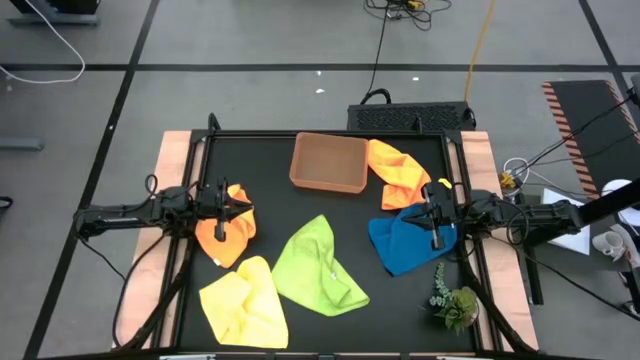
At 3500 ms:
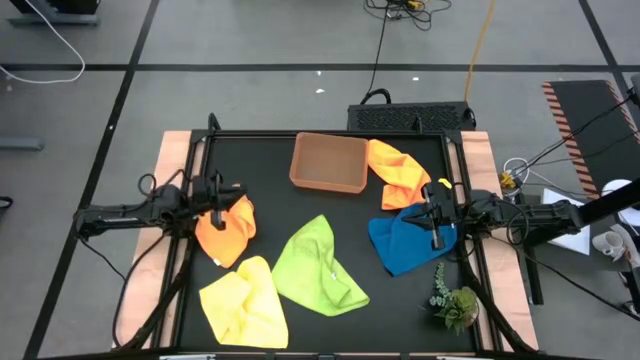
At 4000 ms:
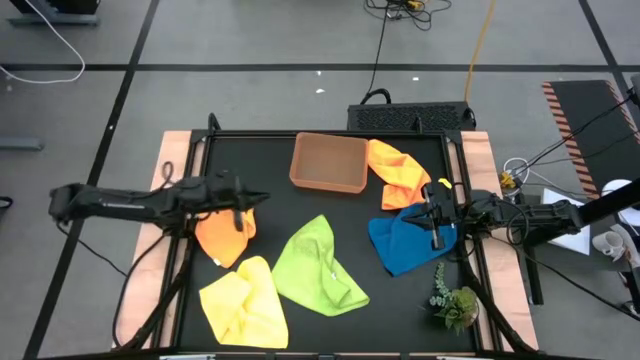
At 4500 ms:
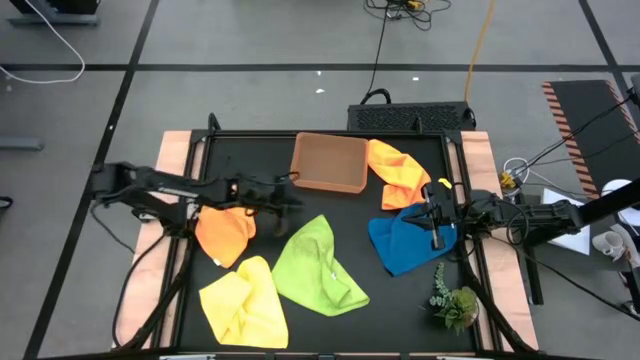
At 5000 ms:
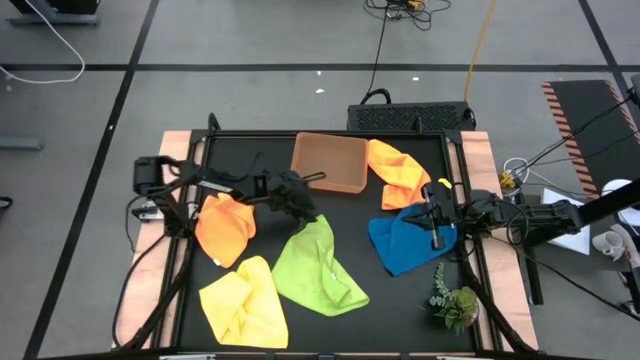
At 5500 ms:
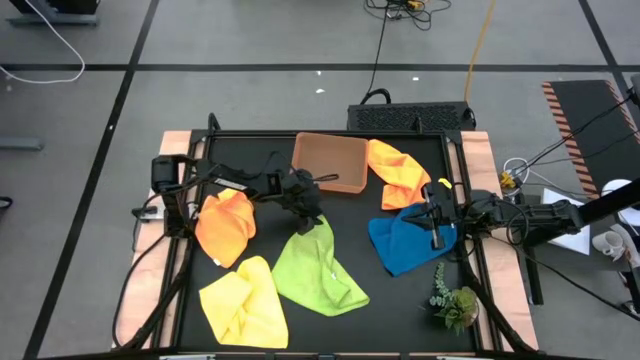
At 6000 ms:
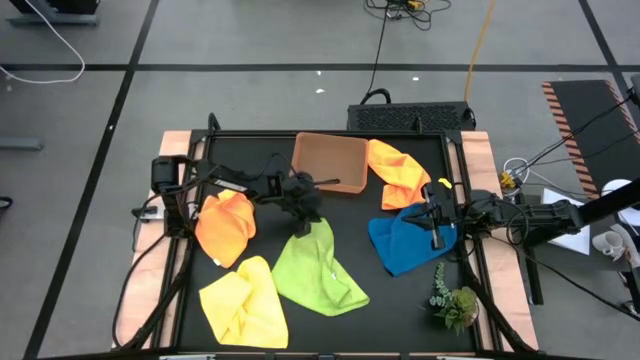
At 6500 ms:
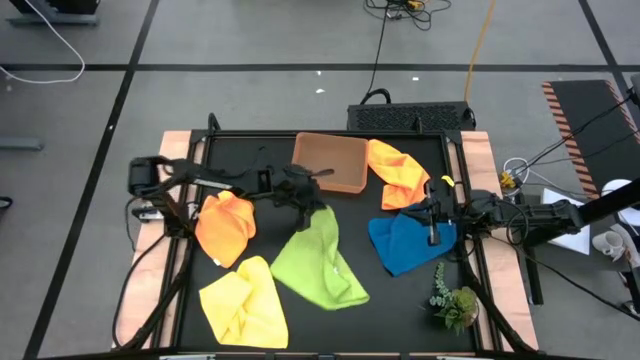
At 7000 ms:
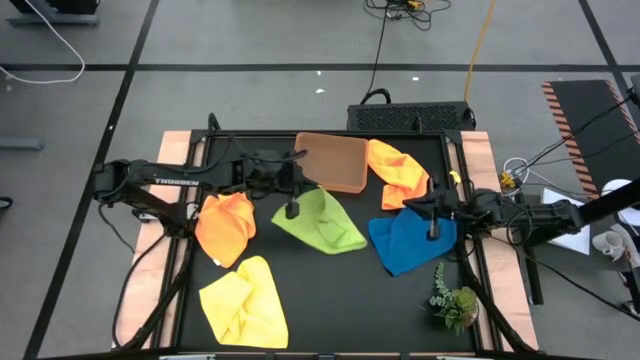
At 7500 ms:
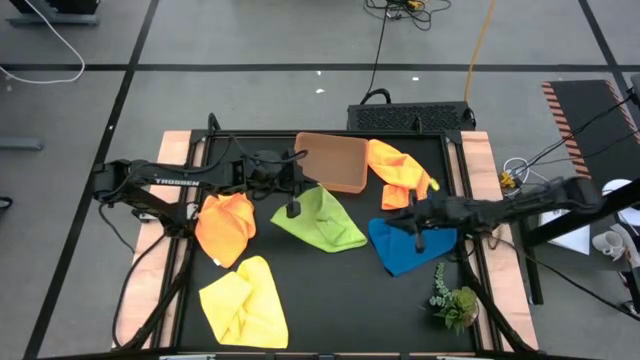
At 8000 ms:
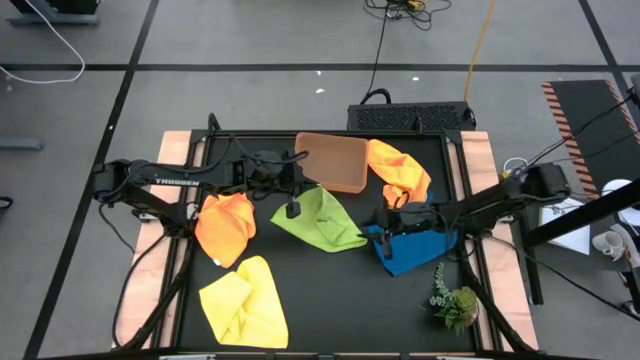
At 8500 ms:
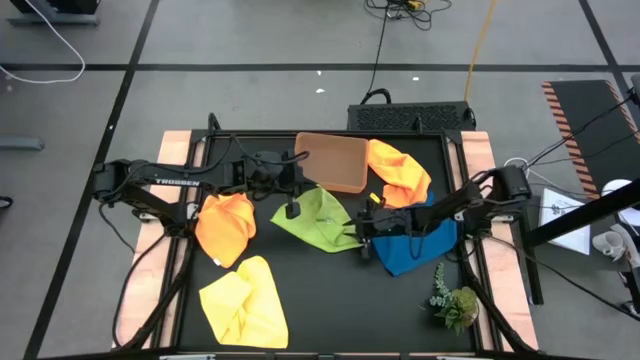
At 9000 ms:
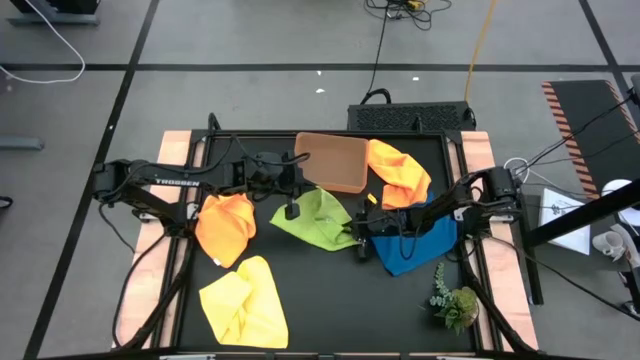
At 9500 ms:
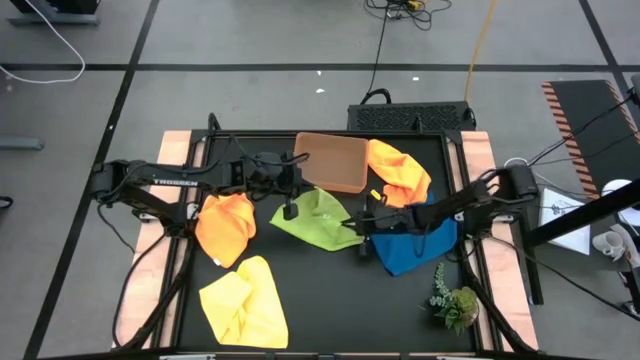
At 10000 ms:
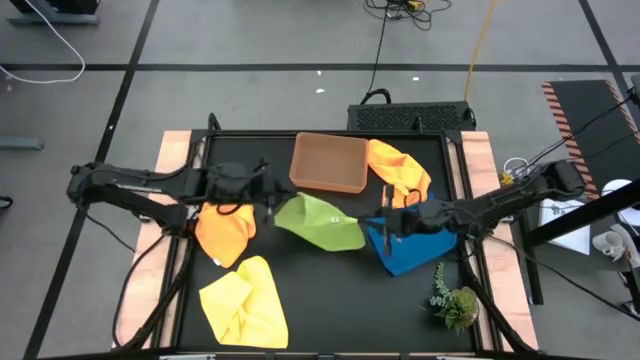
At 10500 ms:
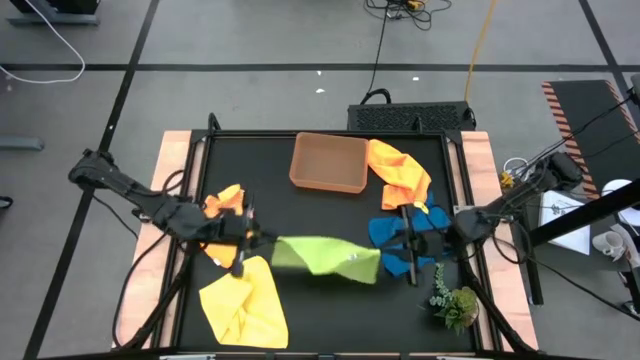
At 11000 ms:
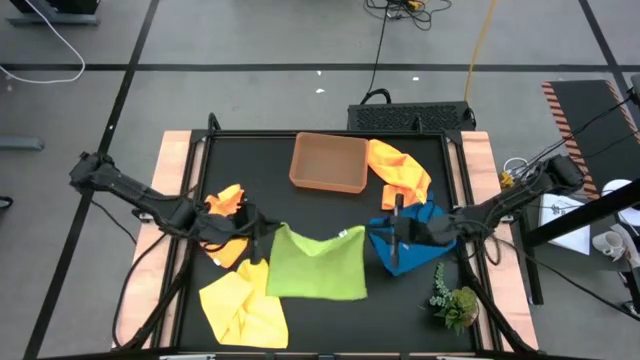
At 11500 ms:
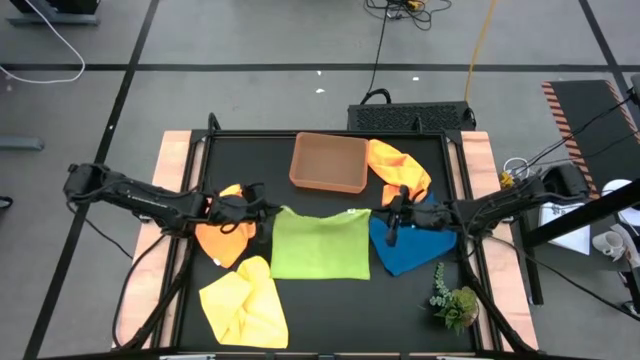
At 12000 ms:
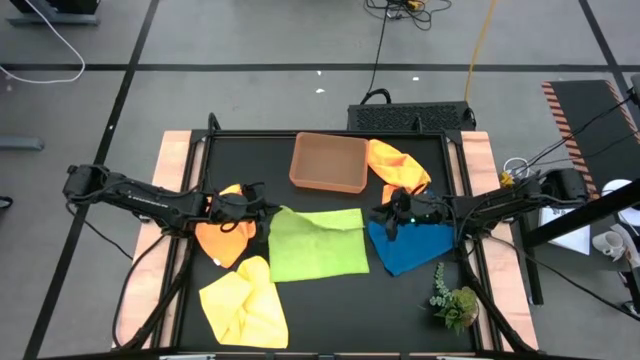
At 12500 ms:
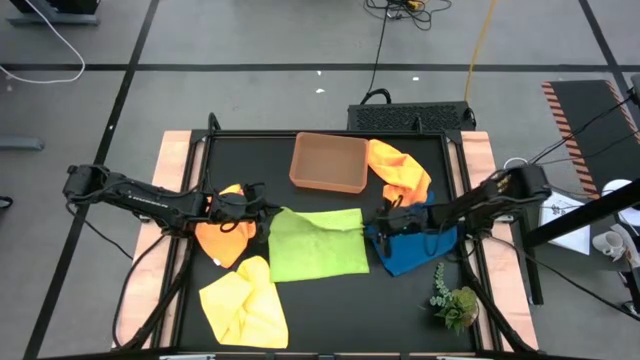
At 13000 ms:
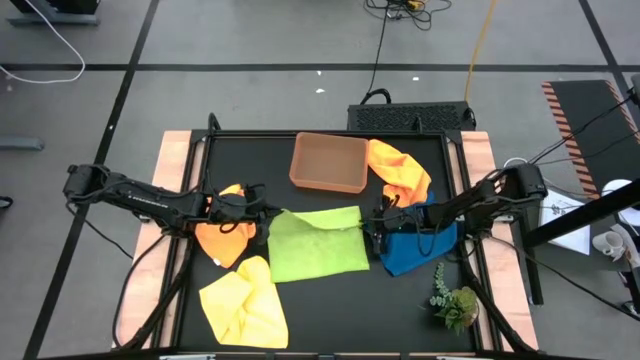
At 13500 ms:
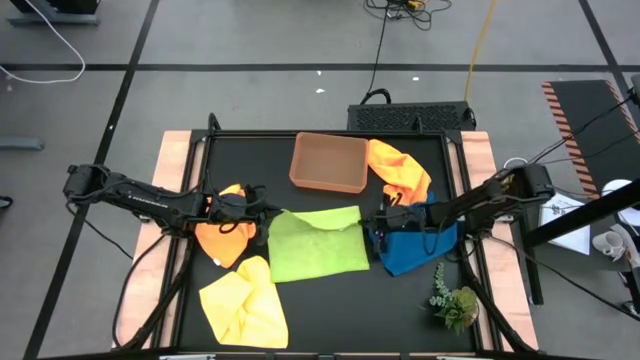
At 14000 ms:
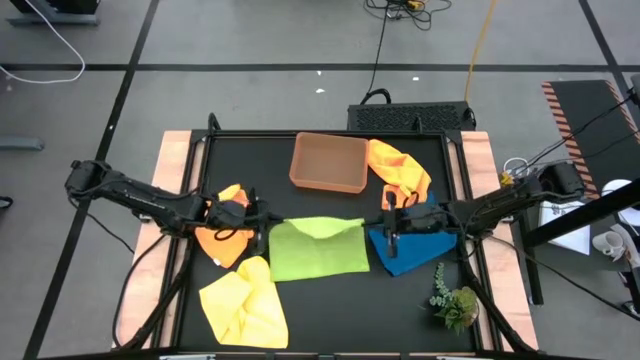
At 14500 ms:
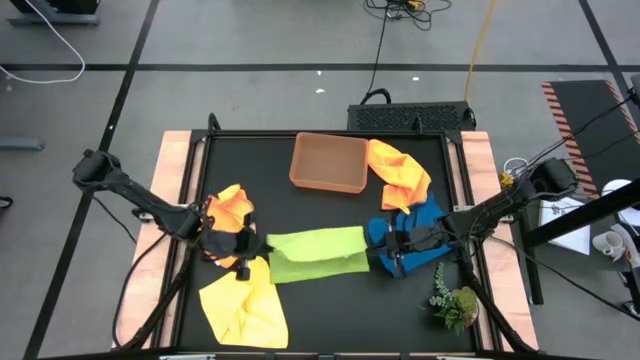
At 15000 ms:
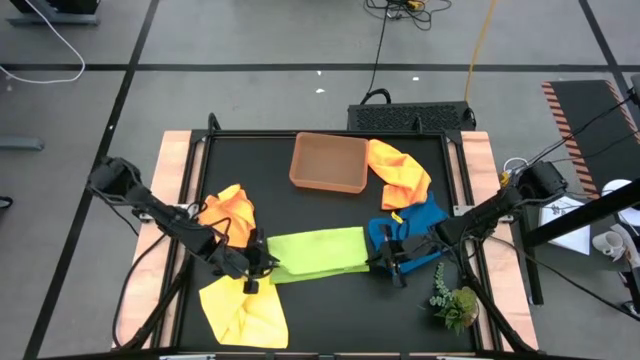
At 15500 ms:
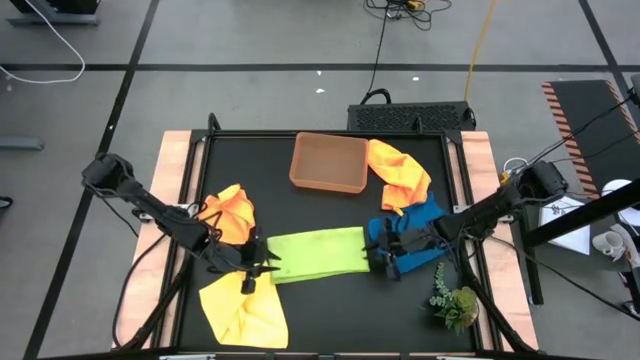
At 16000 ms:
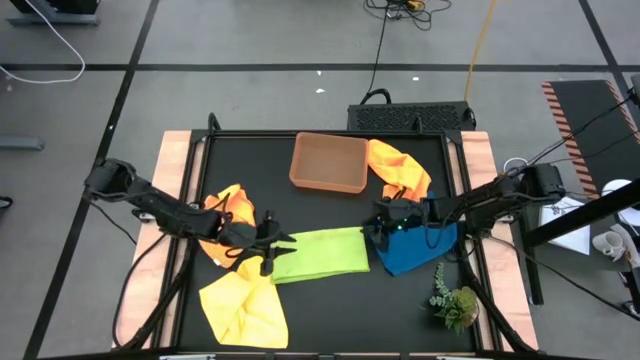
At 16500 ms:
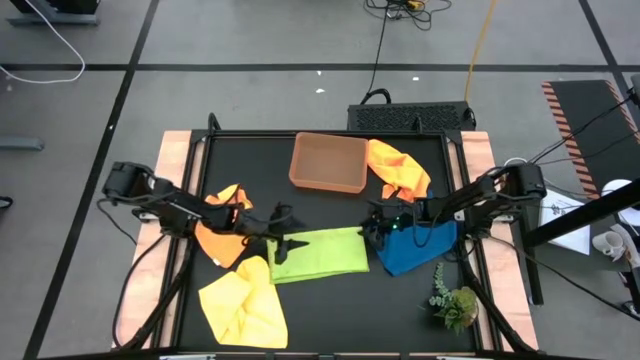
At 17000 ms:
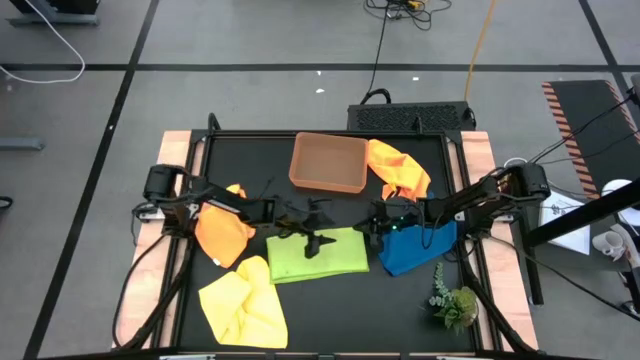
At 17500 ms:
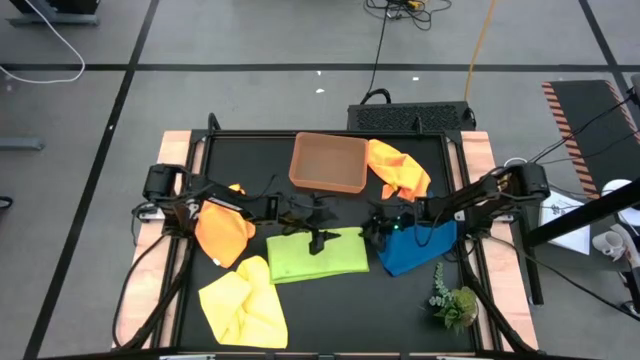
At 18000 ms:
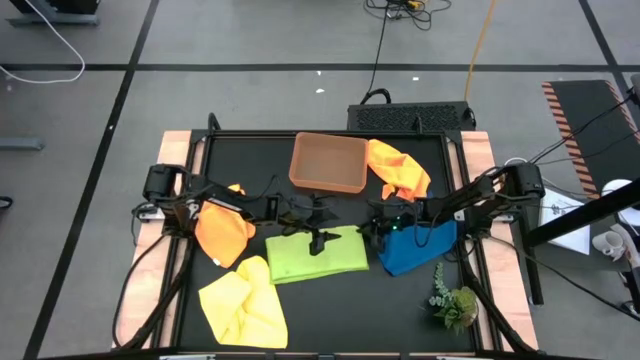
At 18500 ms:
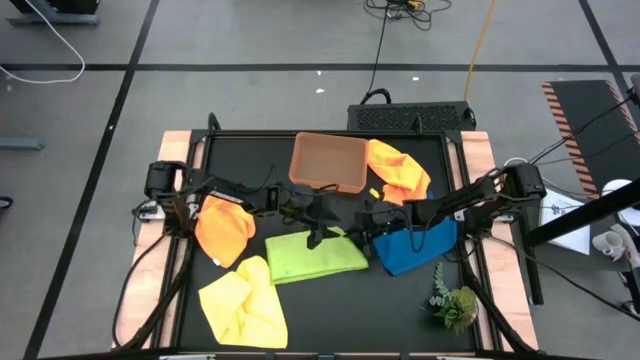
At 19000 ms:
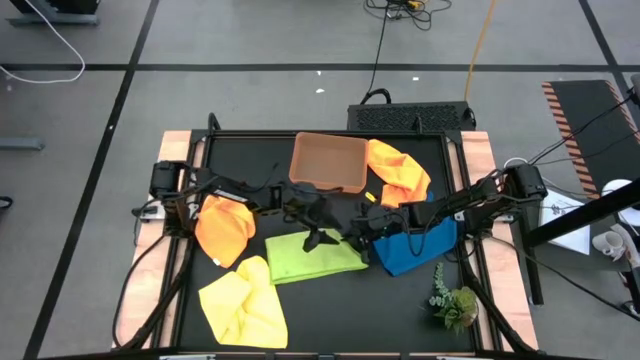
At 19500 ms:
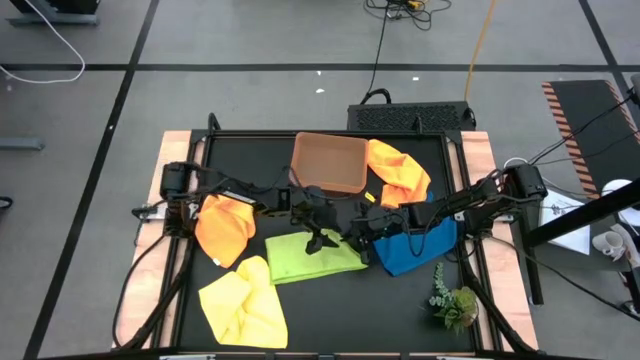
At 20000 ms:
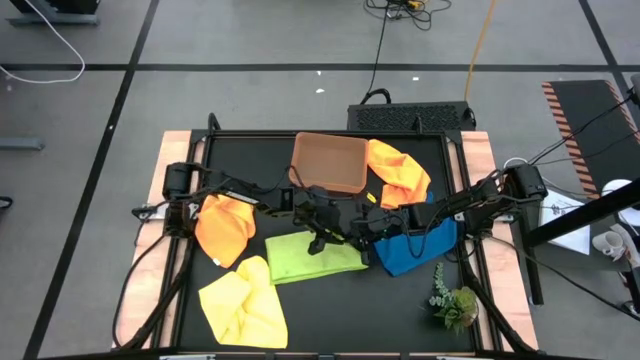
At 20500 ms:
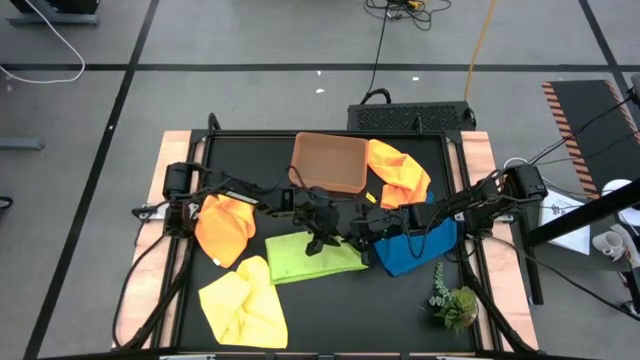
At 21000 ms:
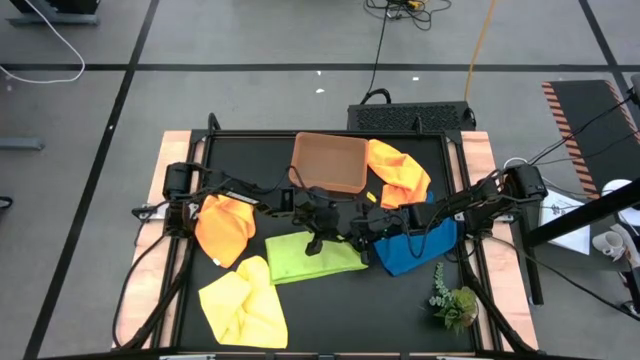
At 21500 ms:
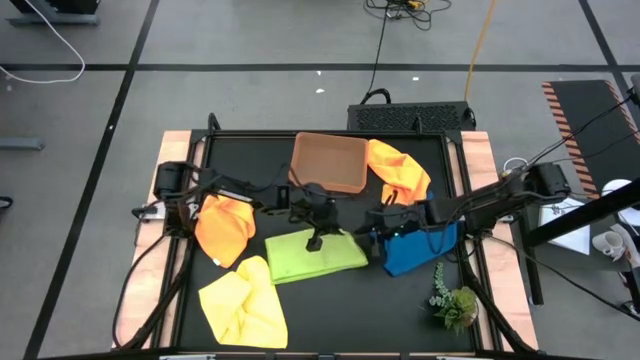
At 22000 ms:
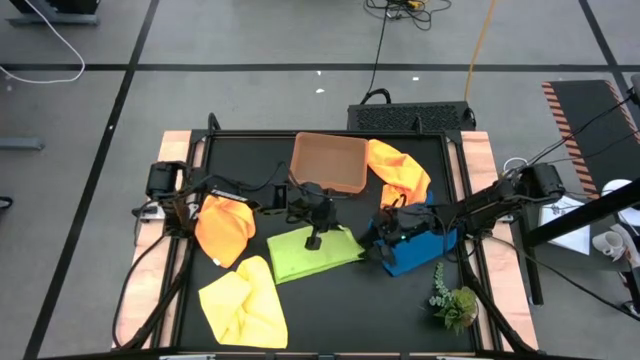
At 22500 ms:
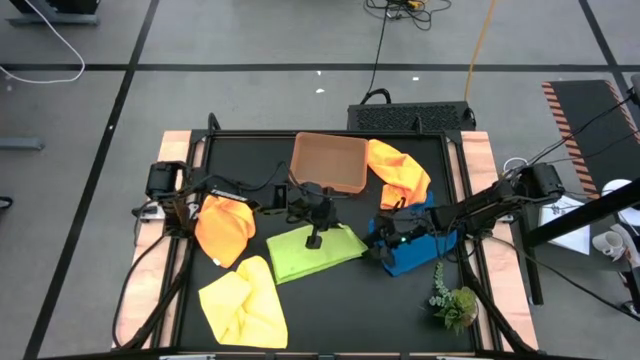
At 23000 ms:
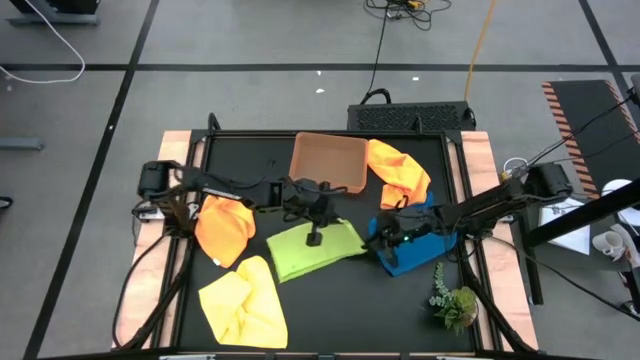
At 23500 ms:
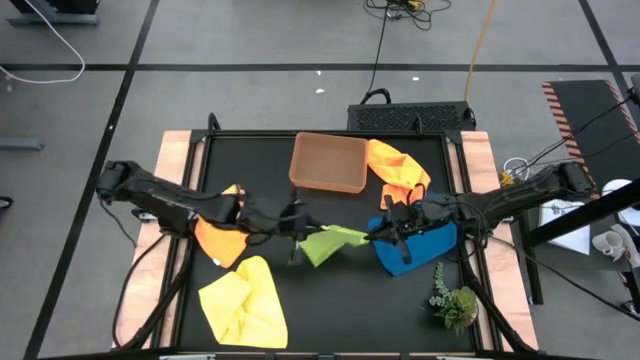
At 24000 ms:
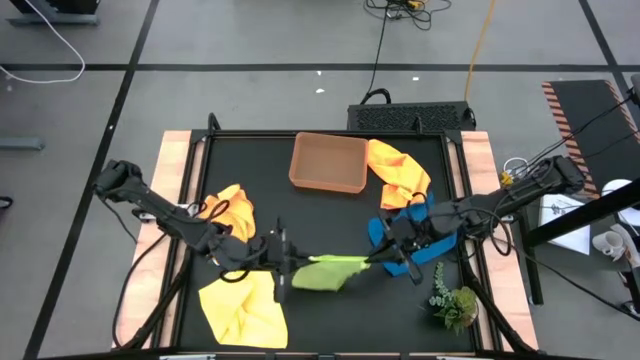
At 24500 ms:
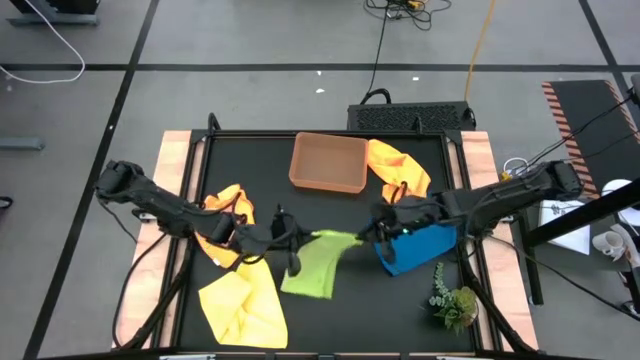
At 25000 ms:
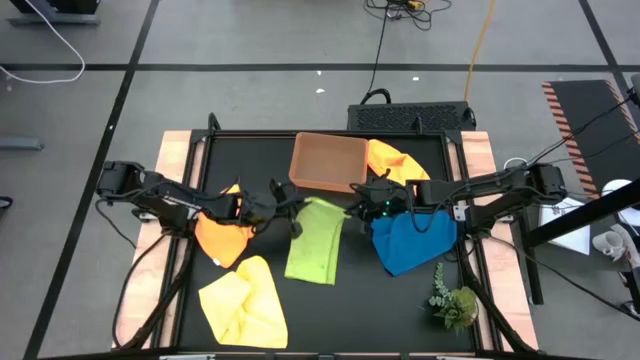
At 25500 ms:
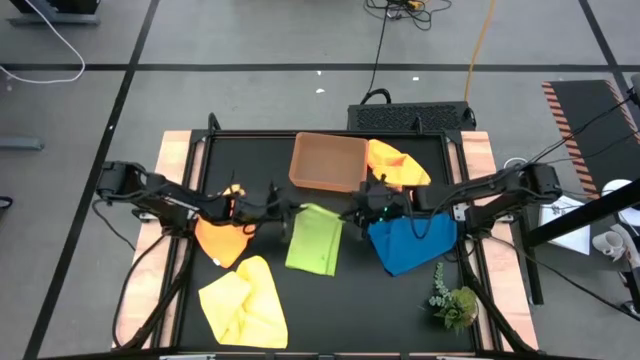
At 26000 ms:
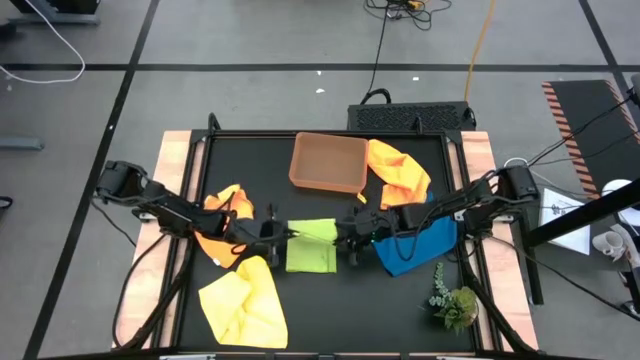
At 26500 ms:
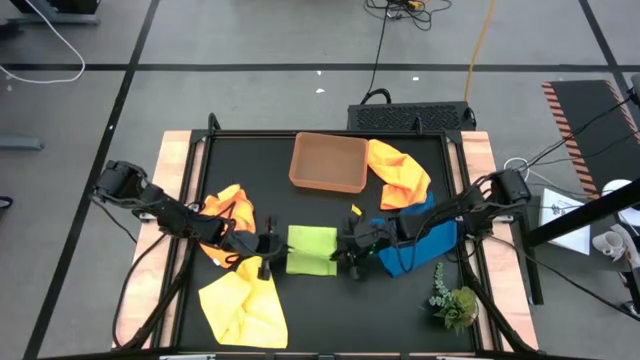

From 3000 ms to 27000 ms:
Task: Fold microfiber towels
Fold the green microfiber cloth
